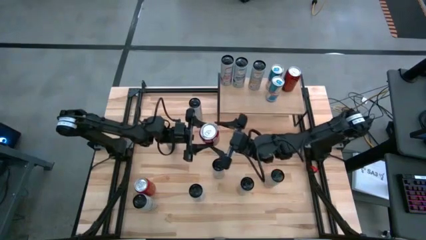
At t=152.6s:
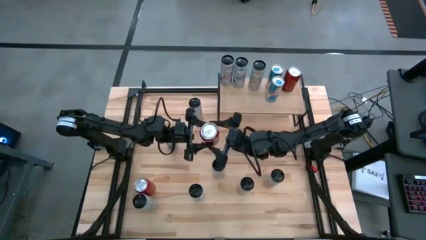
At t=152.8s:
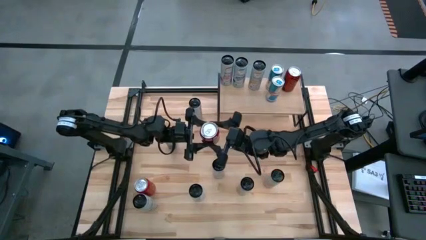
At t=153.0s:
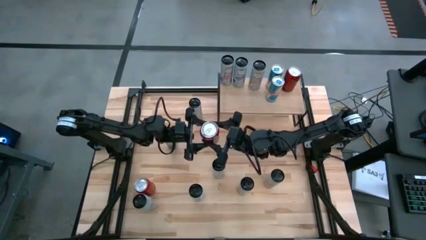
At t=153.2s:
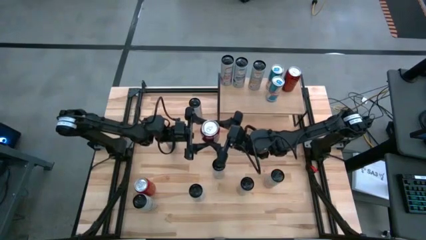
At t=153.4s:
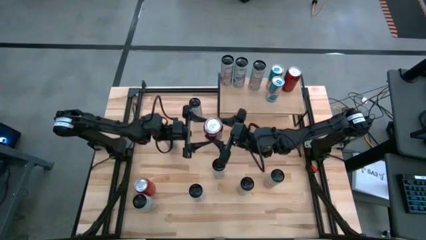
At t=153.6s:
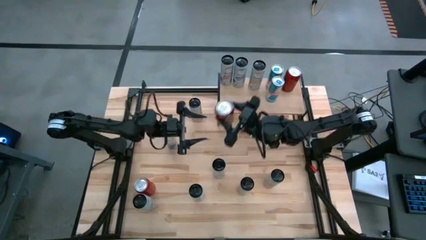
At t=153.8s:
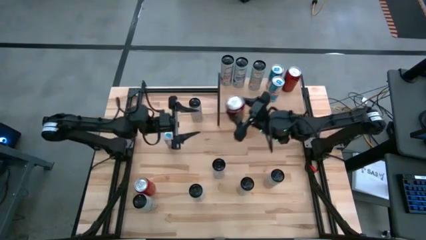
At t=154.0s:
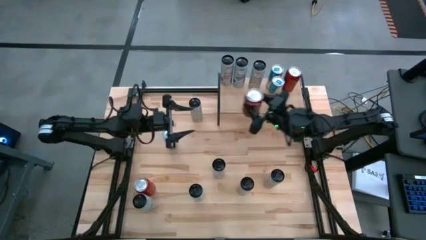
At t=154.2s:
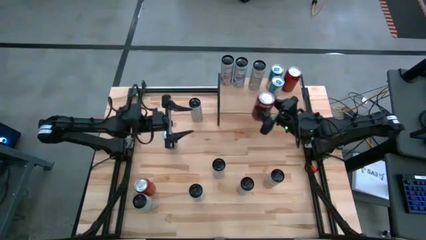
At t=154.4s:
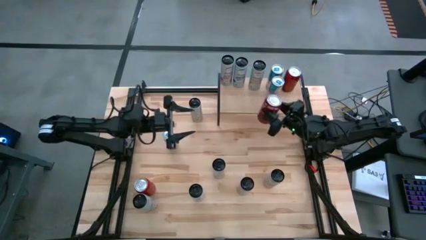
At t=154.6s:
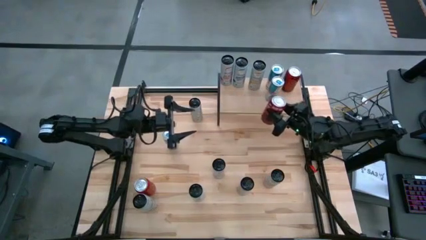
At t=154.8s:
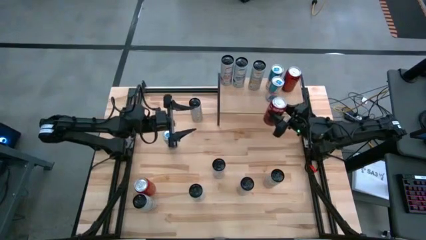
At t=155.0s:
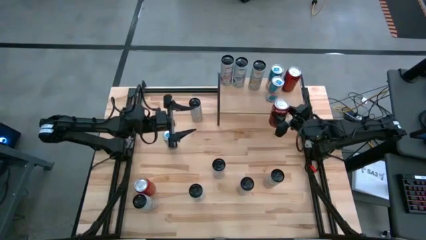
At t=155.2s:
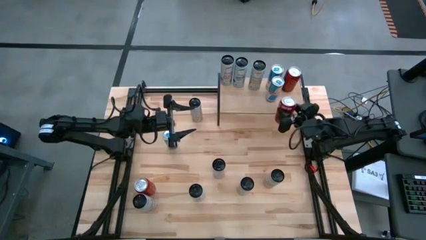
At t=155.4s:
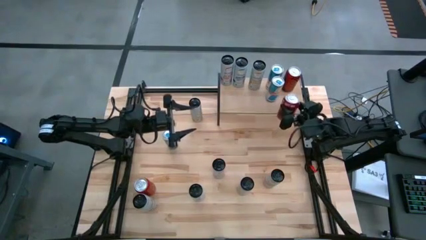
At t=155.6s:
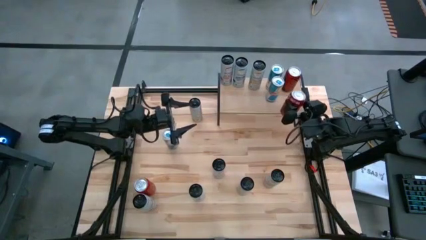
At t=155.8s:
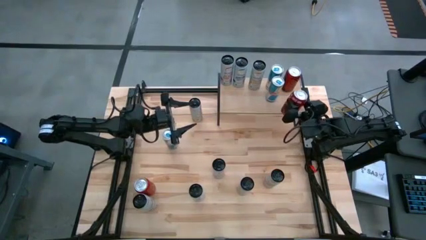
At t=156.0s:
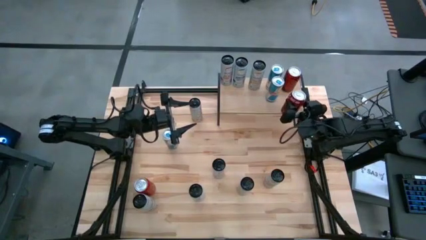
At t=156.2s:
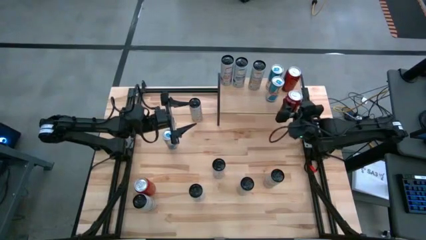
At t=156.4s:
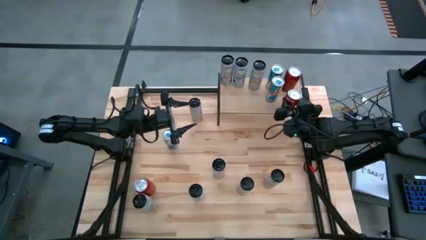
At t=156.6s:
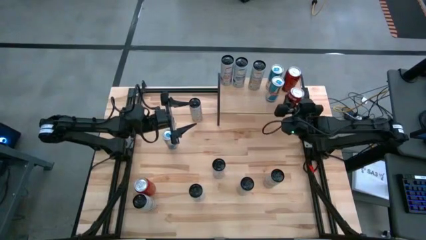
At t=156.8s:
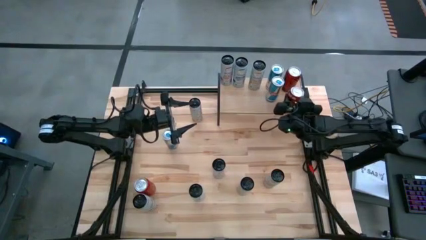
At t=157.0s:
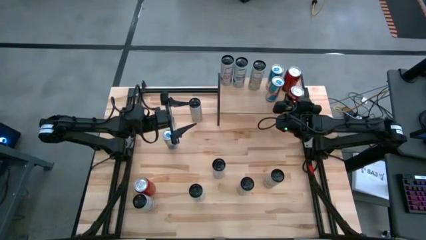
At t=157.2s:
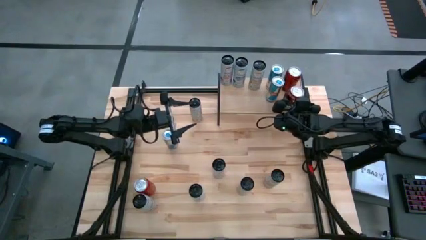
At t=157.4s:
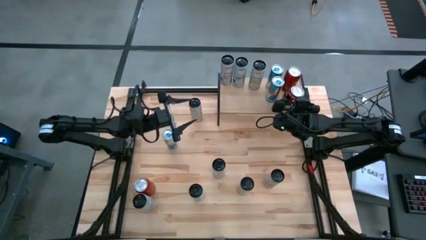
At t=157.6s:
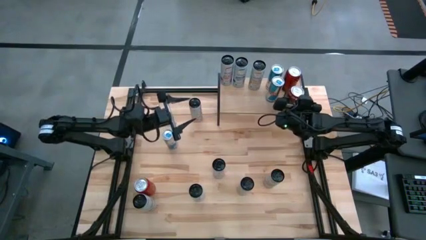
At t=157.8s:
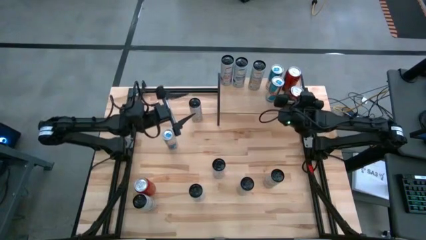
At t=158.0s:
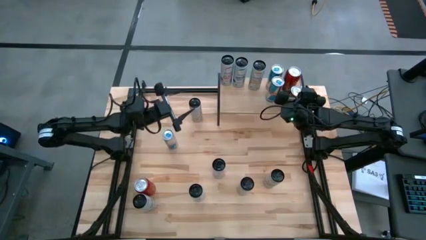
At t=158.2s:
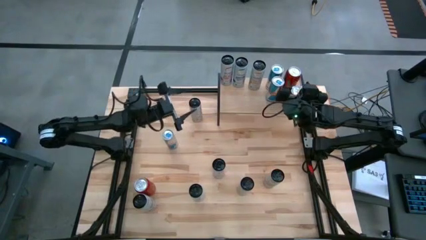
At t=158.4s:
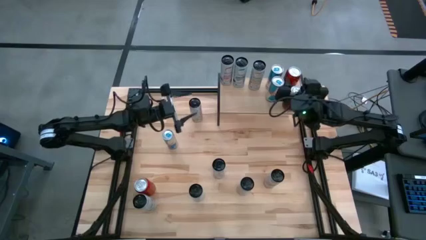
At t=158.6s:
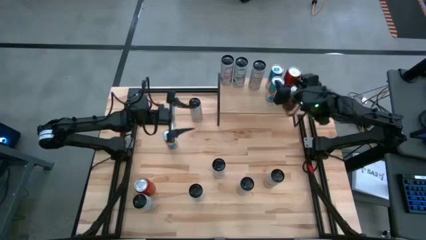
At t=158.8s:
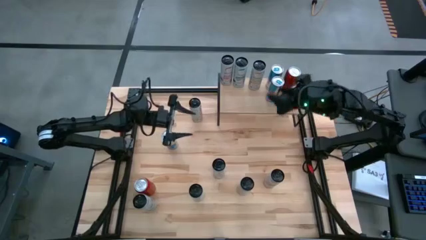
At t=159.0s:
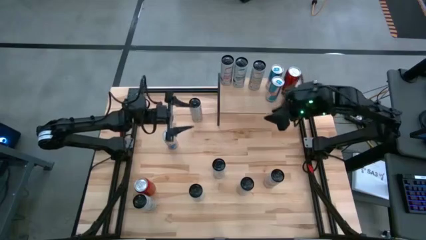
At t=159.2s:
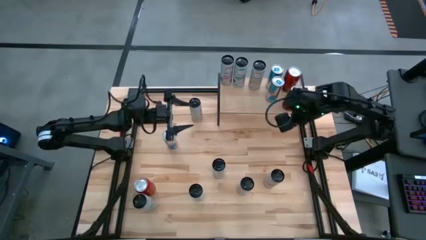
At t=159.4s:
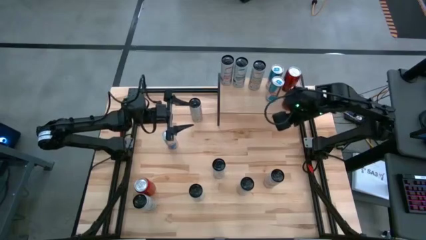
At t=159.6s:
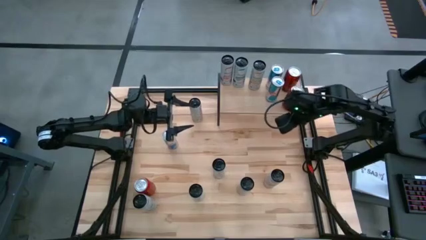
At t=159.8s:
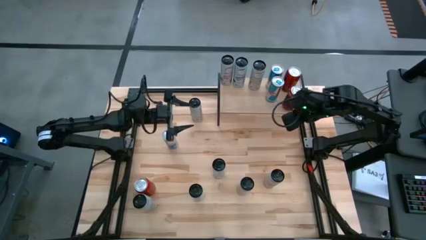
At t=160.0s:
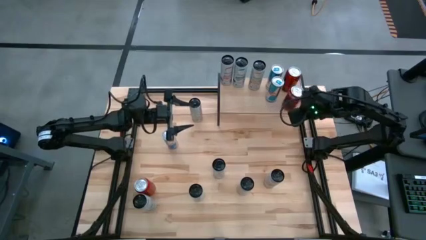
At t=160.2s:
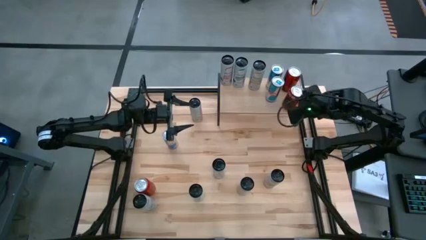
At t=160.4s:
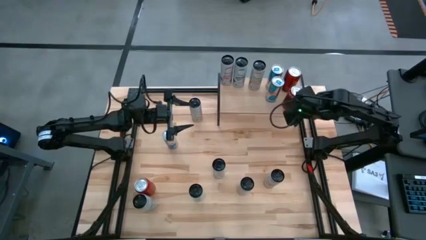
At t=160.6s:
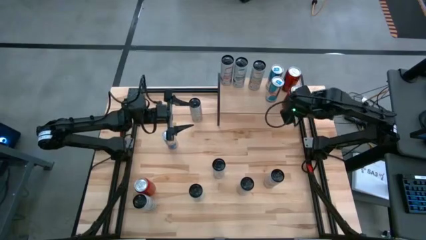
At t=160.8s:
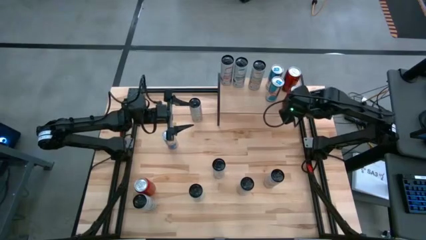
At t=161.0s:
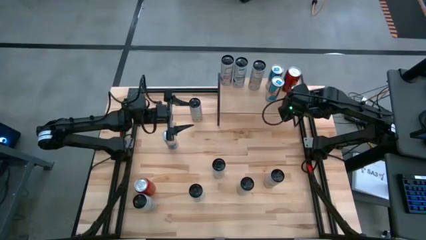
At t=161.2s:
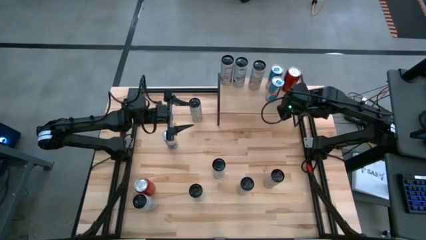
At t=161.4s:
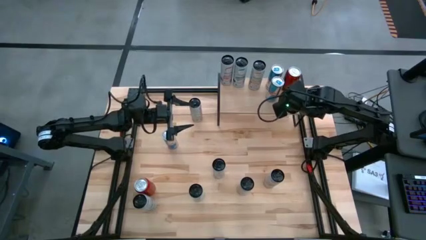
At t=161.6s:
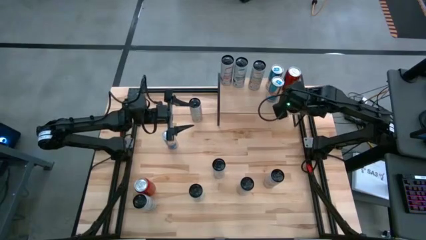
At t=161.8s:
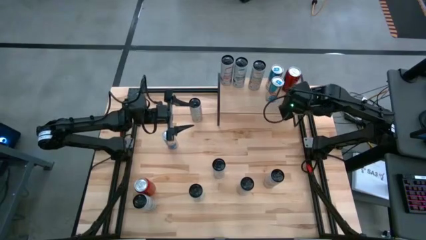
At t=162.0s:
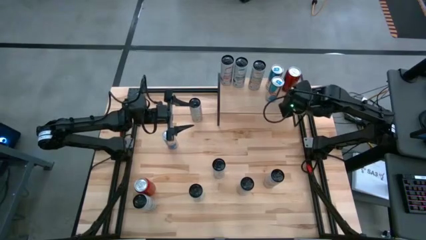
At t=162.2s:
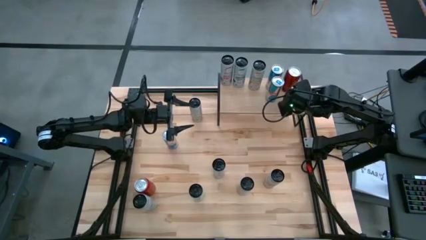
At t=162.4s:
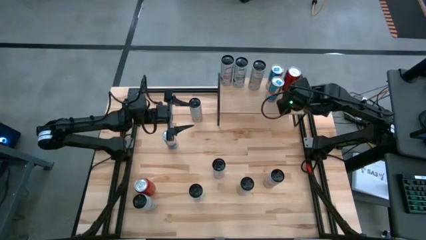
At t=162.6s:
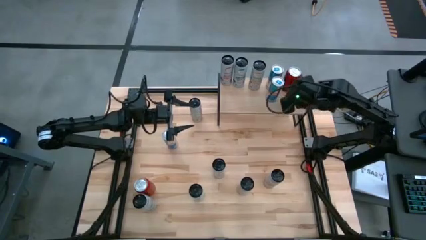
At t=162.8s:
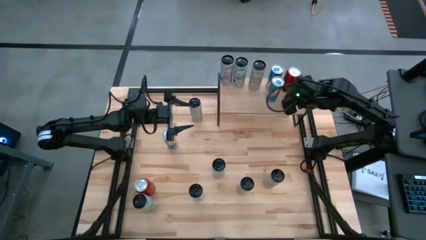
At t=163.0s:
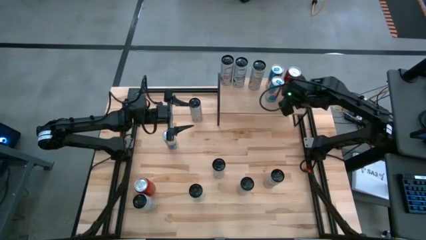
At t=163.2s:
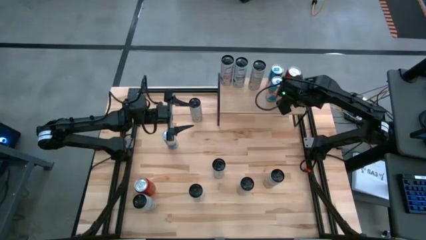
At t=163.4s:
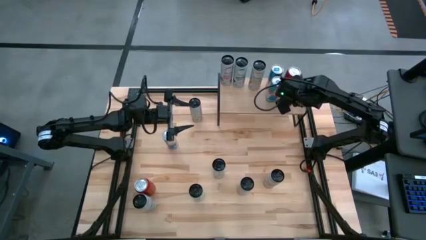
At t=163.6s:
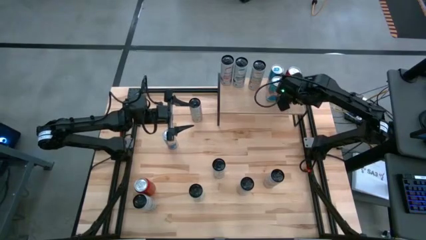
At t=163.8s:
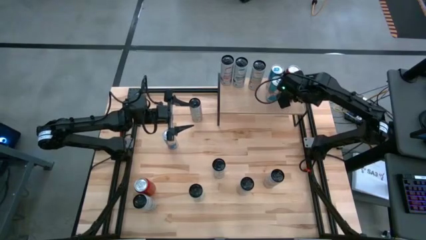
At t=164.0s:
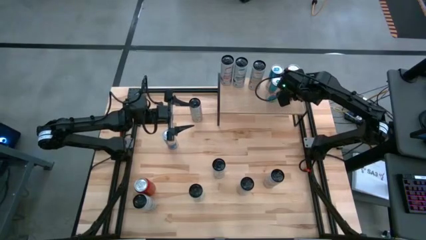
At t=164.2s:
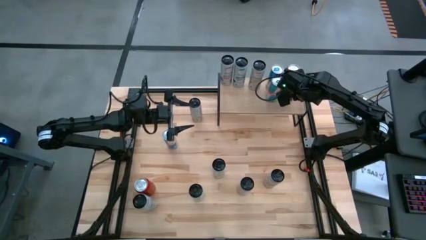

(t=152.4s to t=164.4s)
Task: Place canned beverage on shelf
Put the top red white soda can on the shelf aligned with the red black soda can

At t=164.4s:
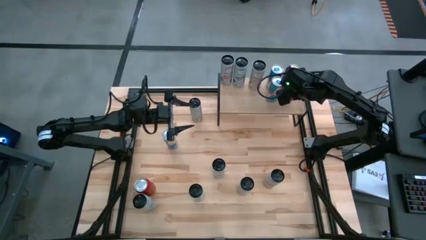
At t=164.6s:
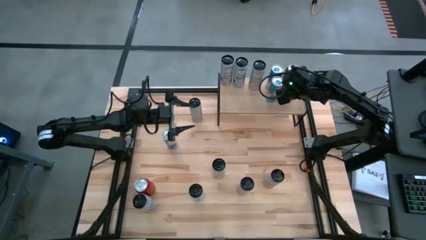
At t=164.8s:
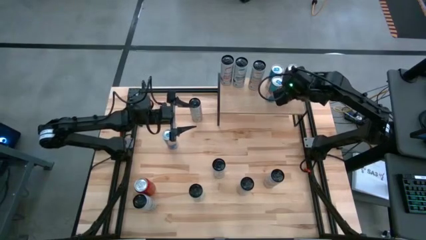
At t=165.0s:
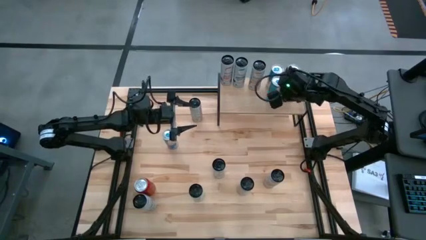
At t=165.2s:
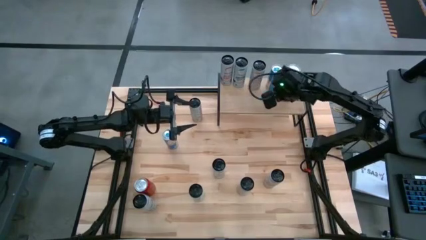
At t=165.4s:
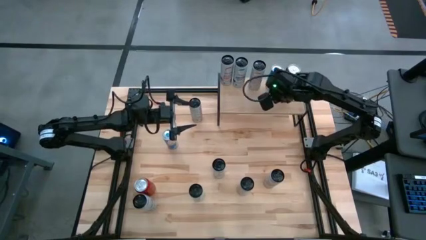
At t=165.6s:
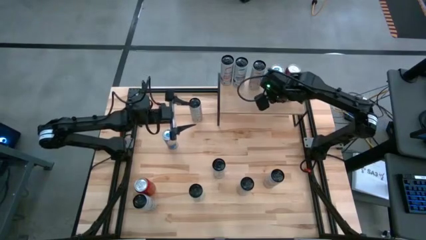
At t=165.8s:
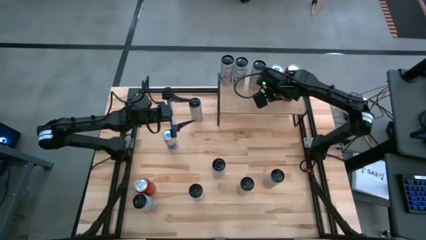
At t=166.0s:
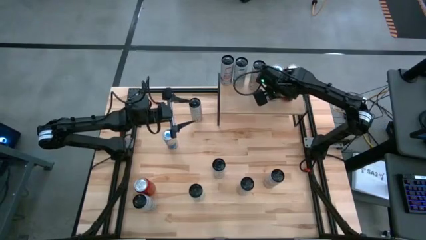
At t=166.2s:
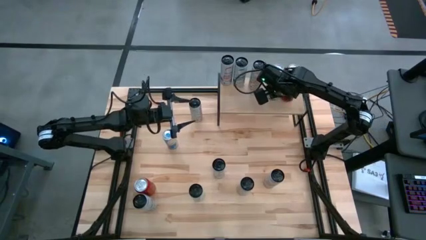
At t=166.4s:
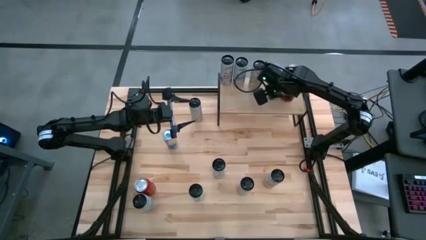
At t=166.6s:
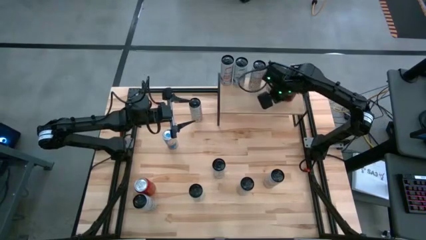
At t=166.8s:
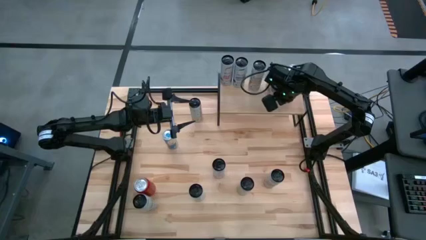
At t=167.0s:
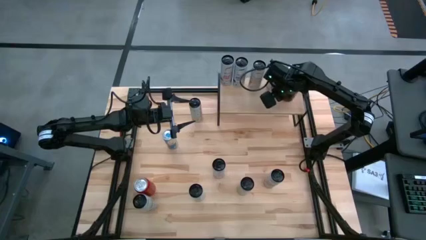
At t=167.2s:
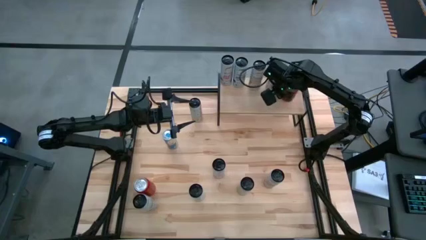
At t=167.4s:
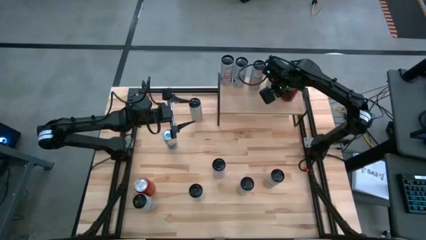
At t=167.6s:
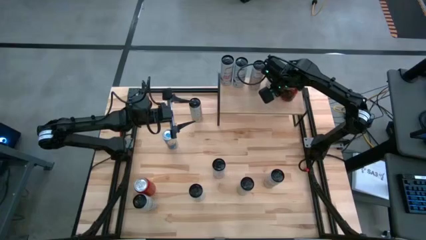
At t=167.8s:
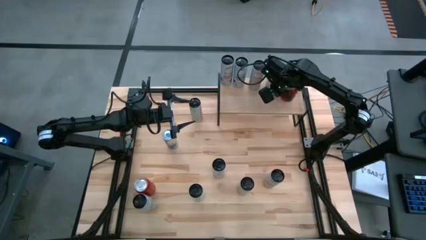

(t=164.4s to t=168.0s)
Adjust the blue can on the shelf
